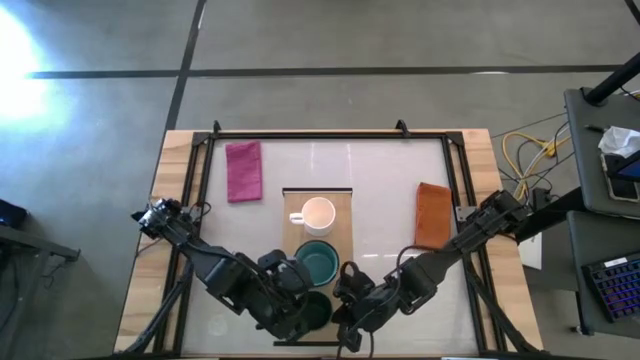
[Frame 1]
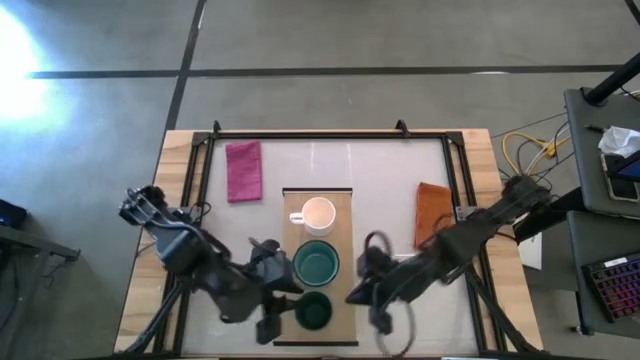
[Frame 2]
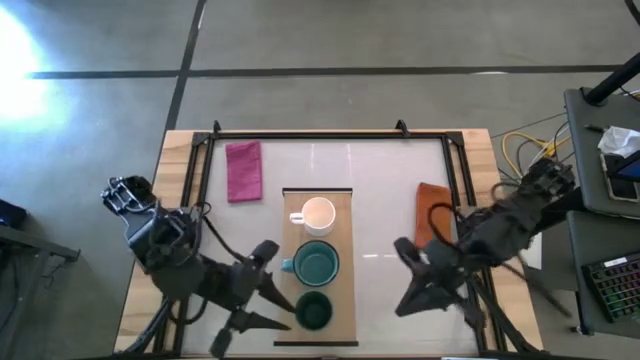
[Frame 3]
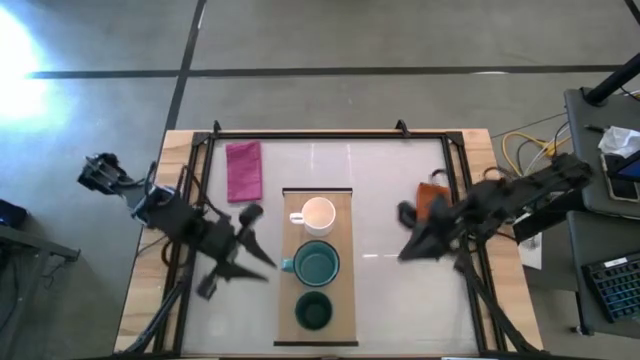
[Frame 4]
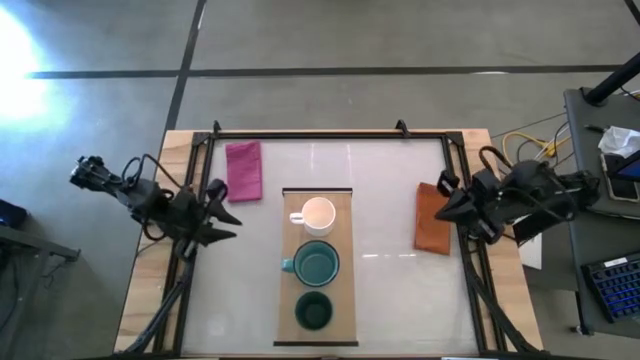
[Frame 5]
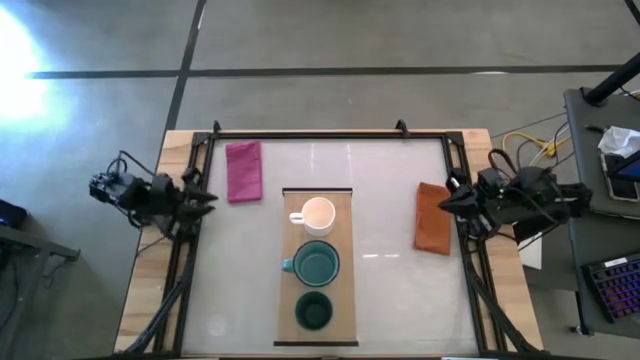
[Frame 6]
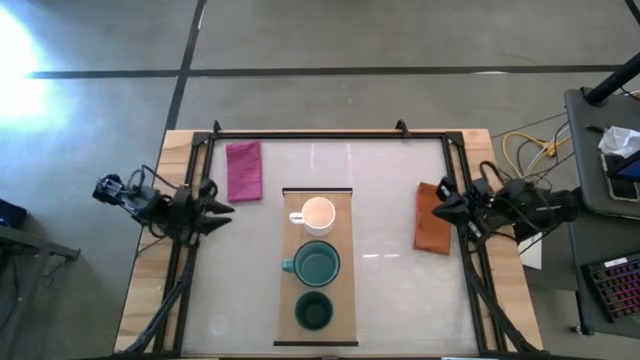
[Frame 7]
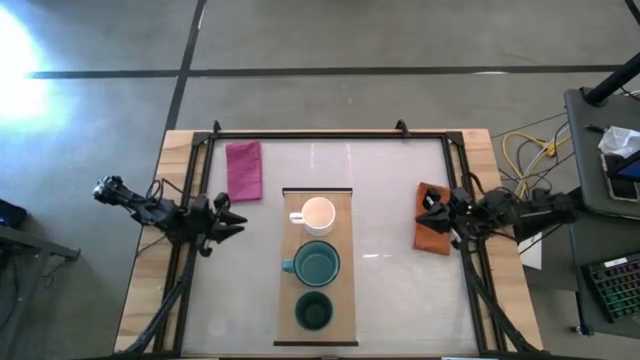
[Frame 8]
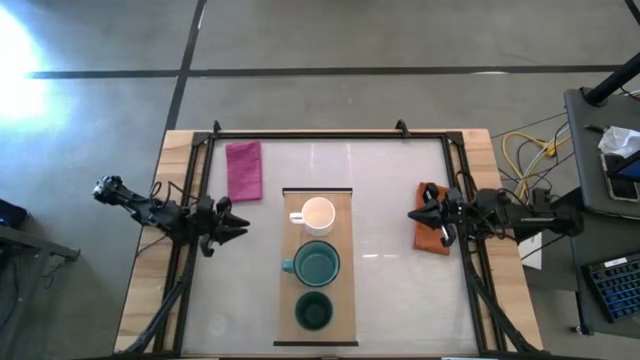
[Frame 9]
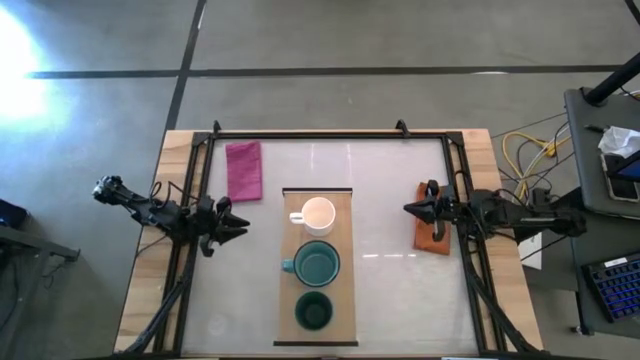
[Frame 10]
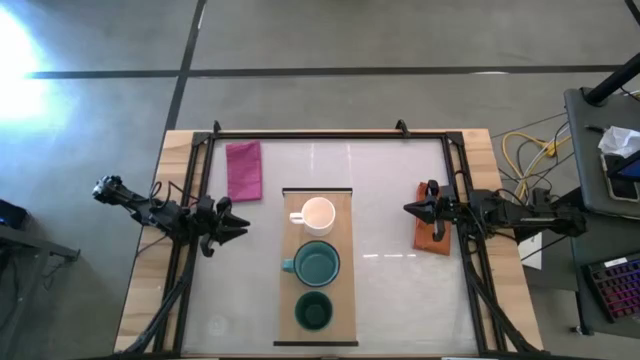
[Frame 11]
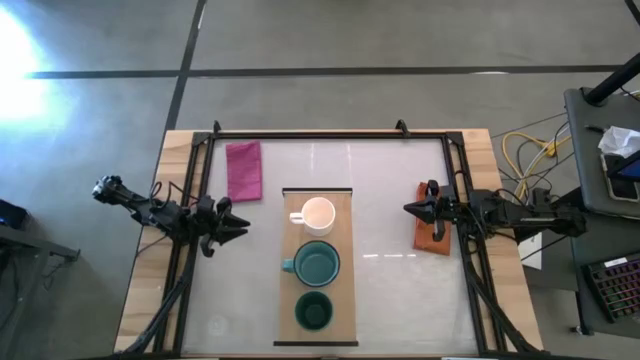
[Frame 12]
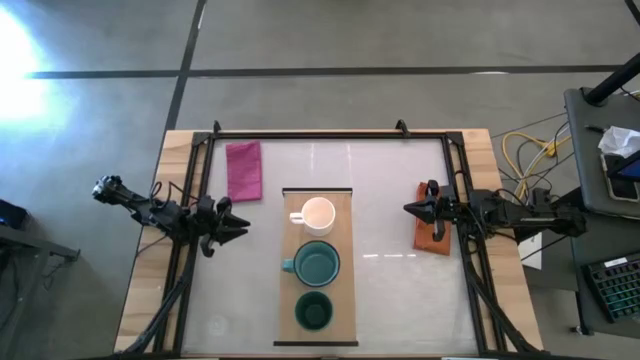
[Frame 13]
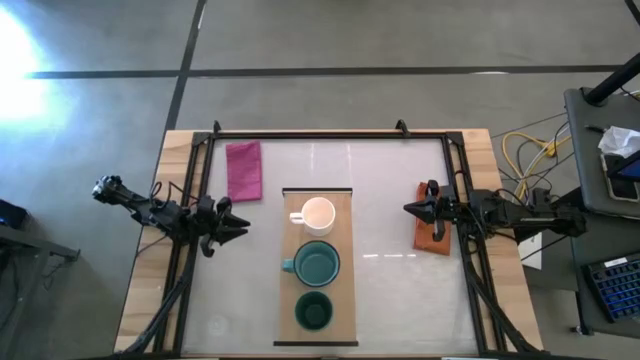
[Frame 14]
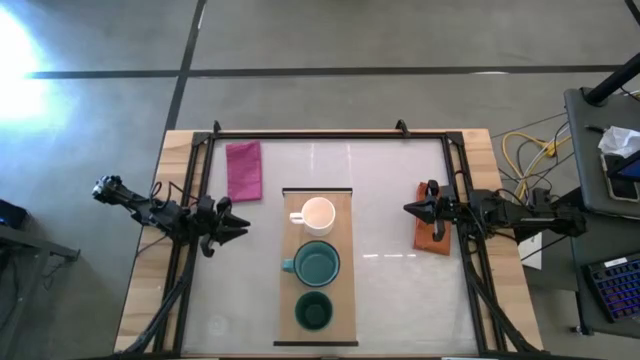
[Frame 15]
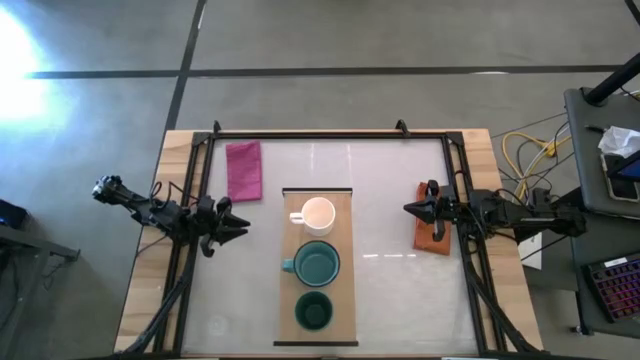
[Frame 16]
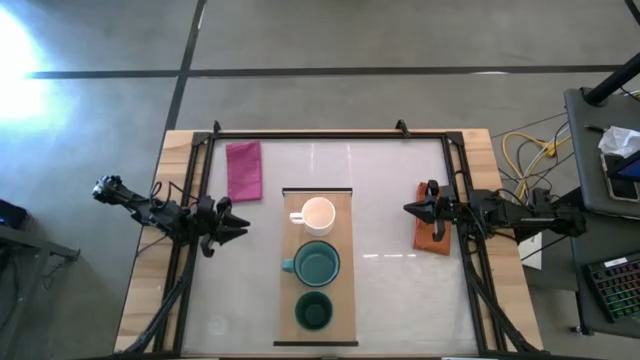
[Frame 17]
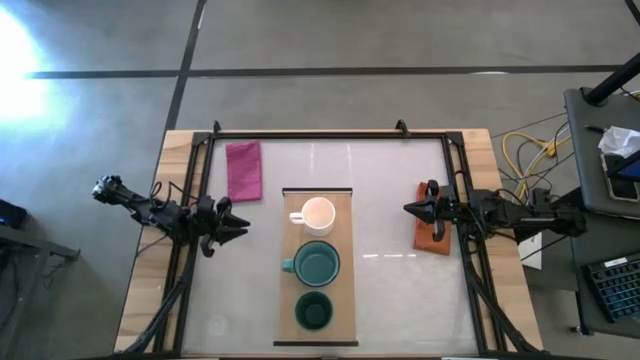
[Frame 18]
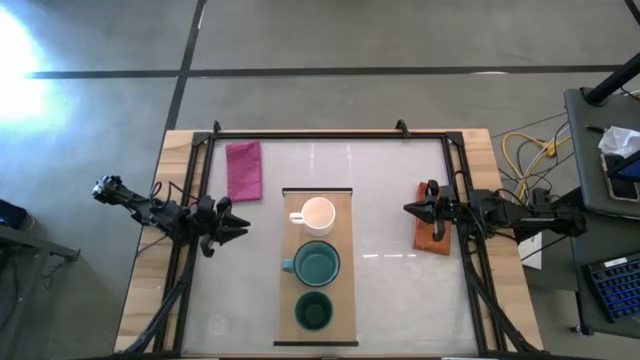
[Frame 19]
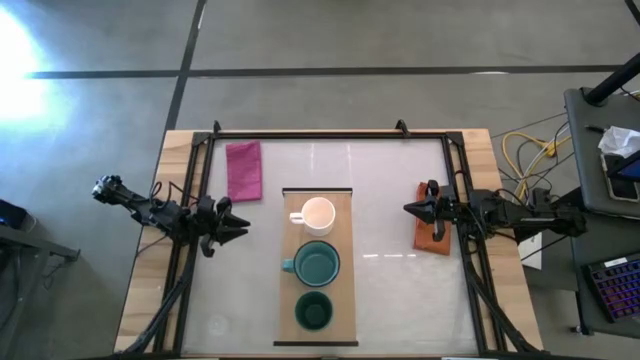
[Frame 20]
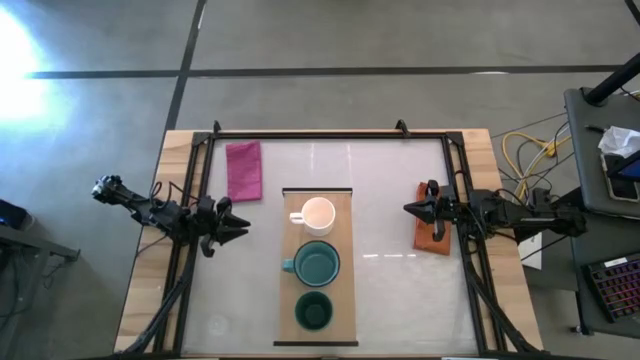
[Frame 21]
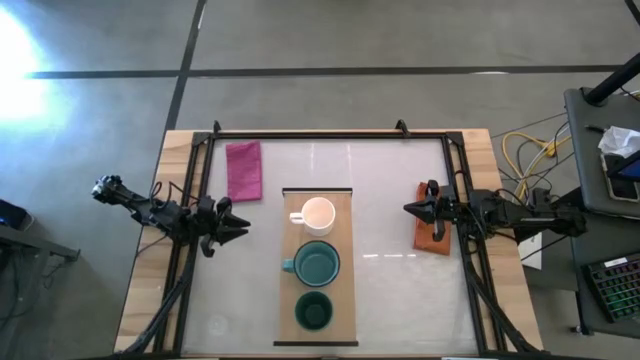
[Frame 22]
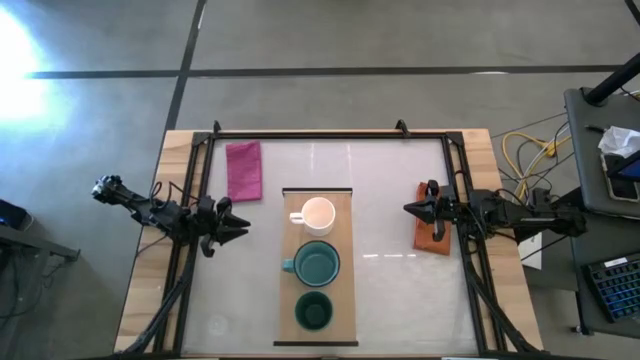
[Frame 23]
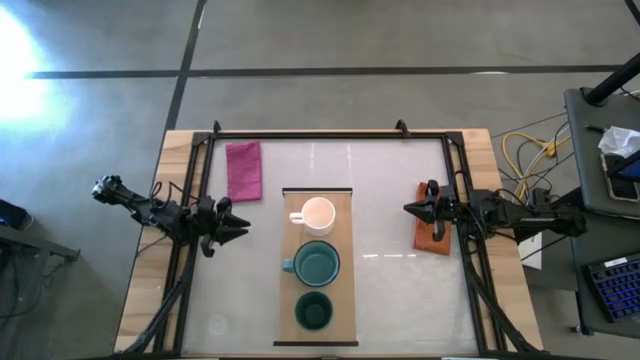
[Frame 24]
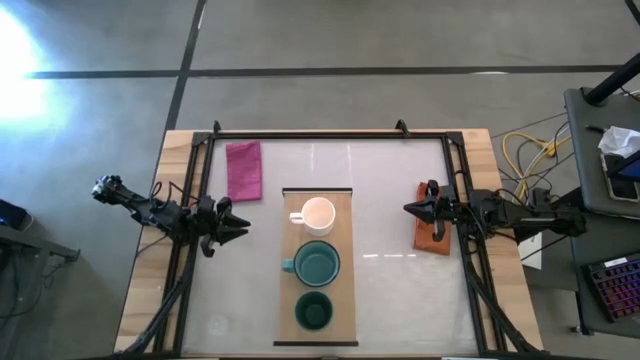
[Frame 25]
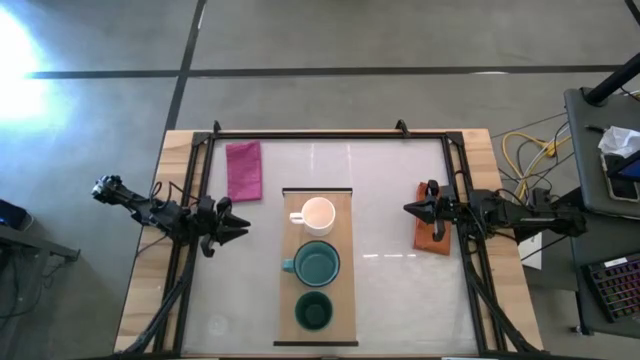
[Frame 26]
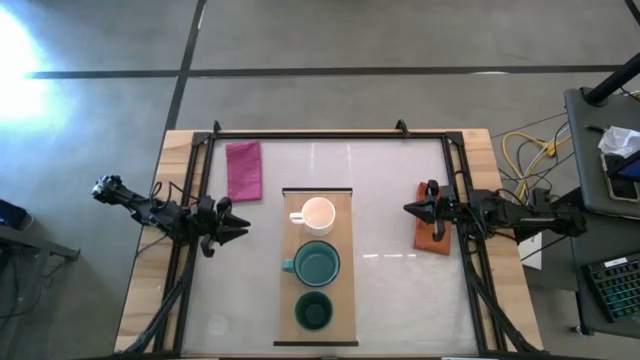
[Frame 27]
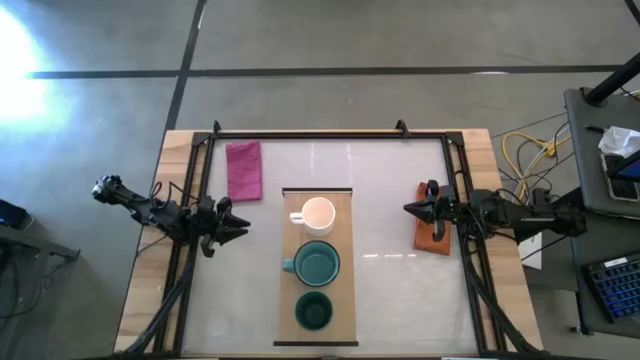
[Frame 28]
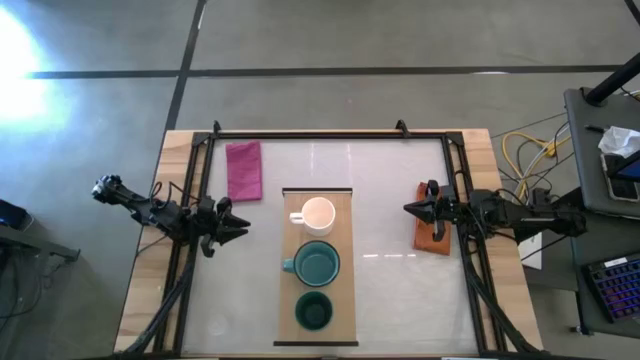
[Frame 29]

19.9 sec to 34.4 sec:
Task: Stack small to large cups/mugs on shelf
Return to Home Position

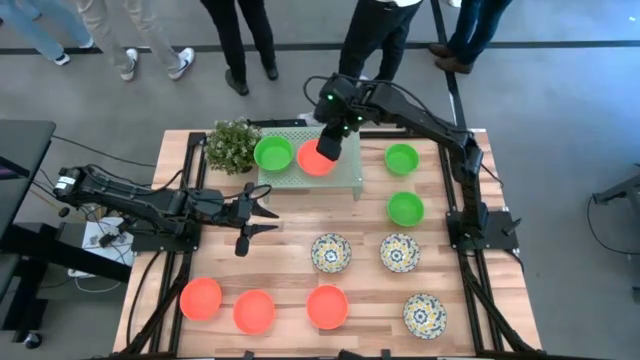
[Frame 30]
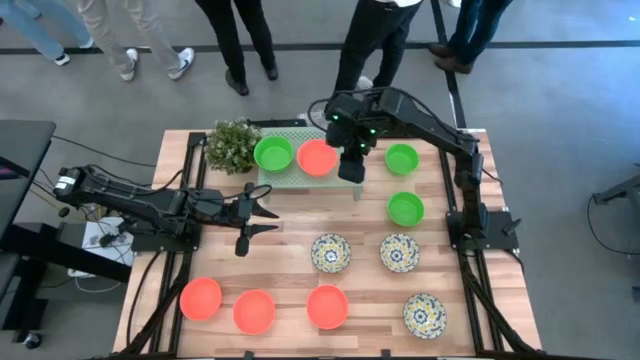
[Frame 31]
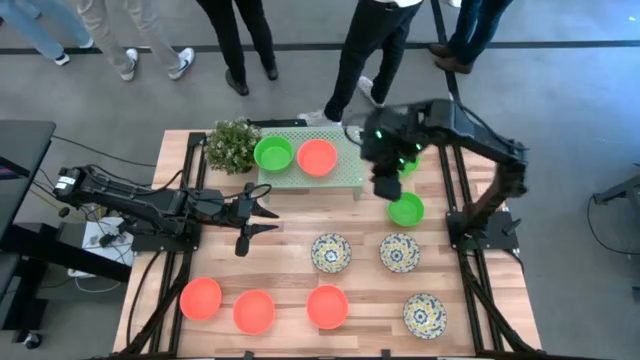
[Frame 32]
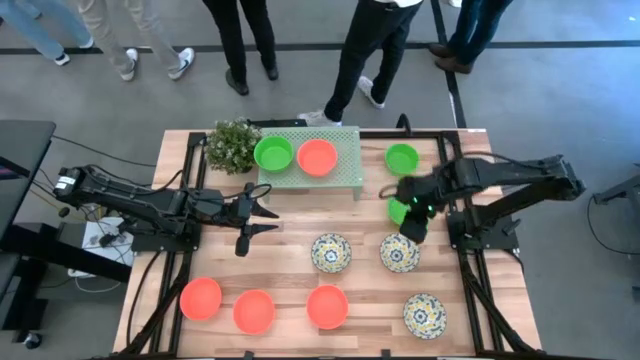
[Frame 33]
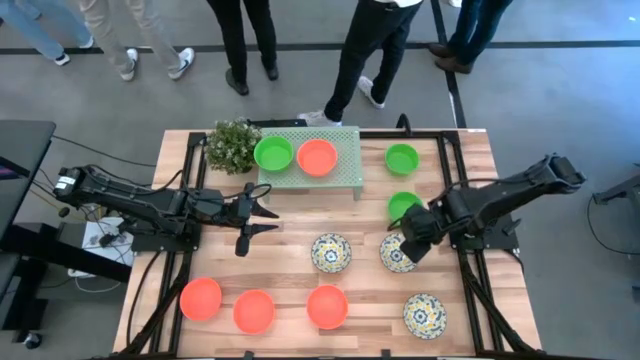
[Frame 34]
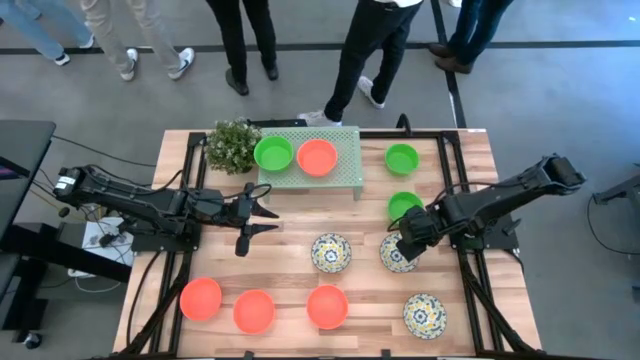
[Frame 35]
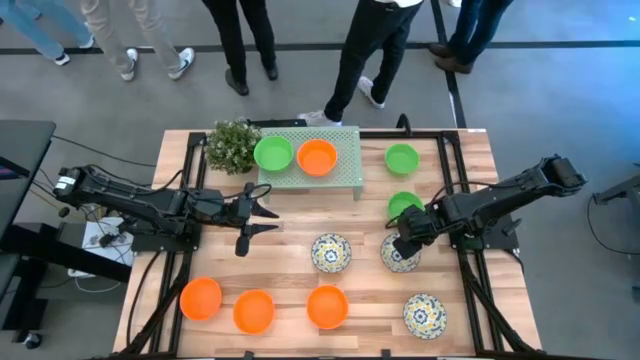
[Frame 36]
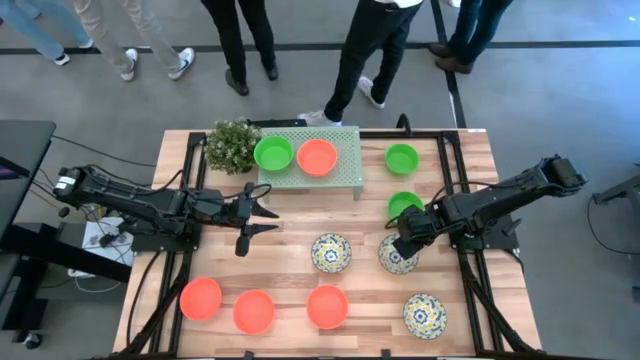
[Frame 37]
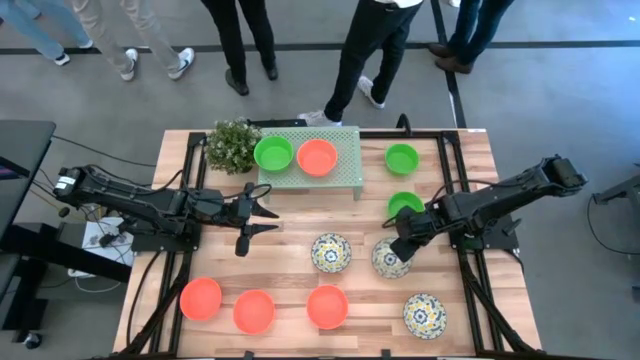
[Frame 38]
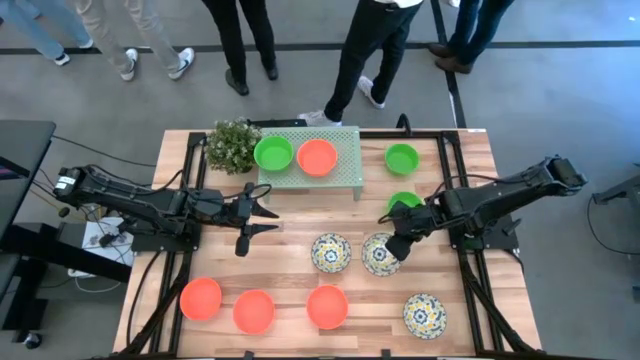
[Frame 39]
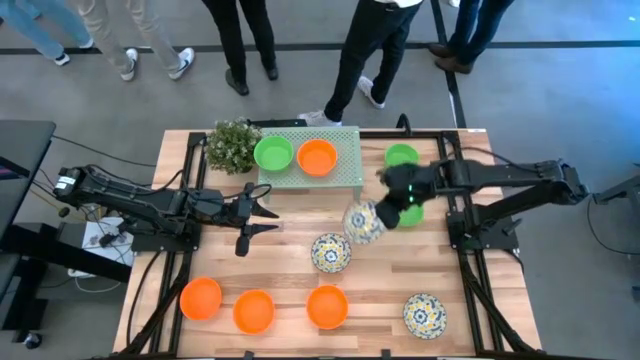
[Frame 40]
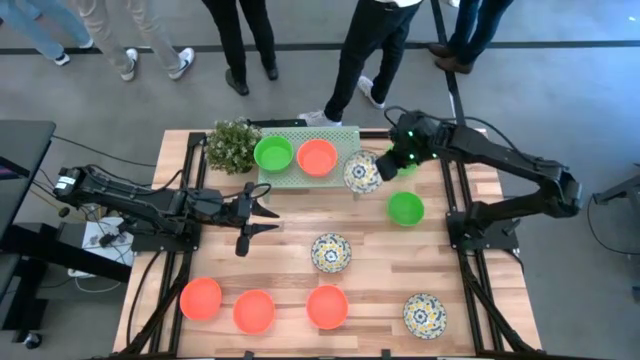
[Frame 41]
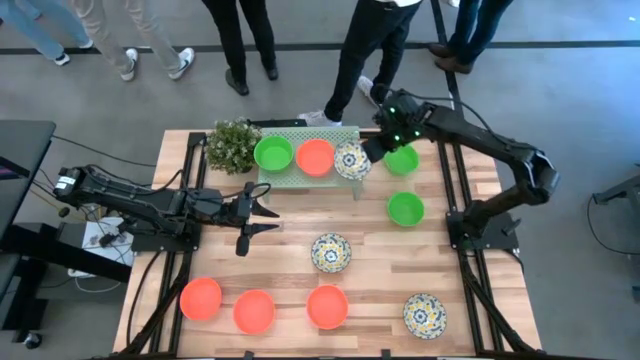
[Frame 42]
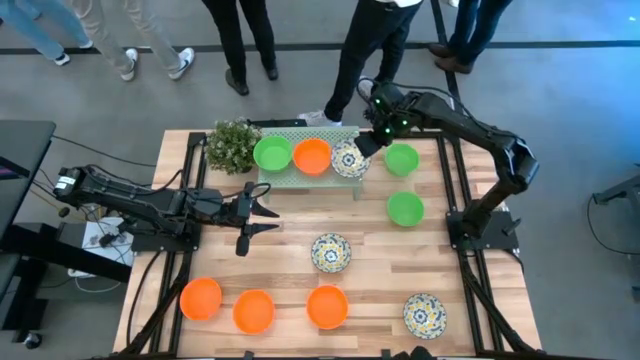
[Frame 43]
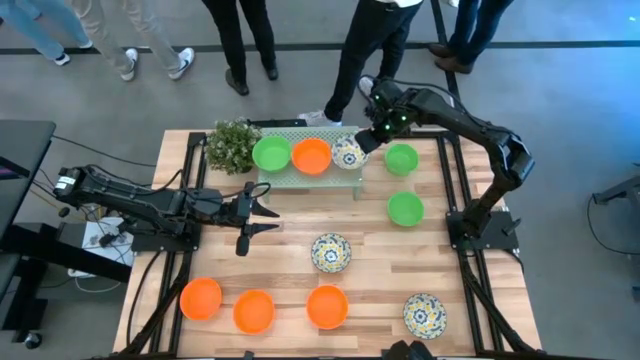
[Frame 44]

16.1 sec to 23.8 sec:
Task: Pick & Place Mini bowls
Put the yellow bowl on the shelf
